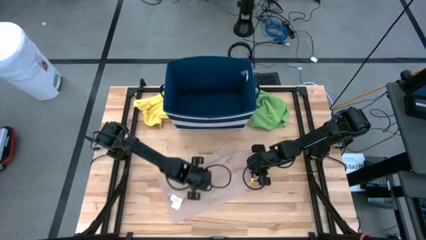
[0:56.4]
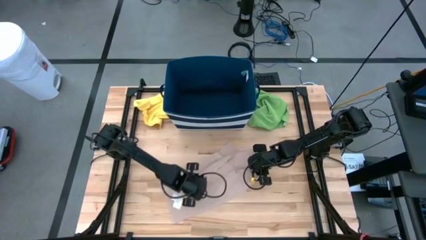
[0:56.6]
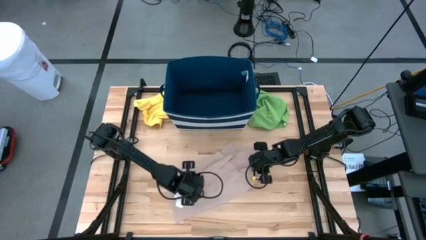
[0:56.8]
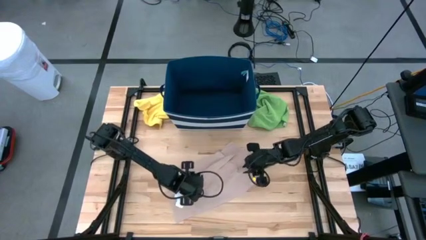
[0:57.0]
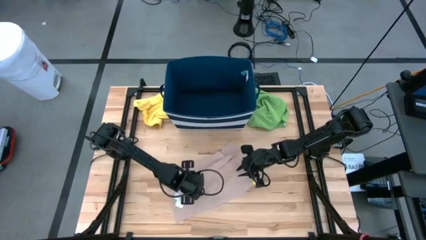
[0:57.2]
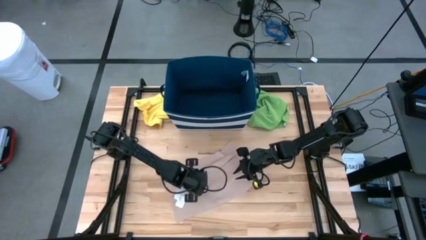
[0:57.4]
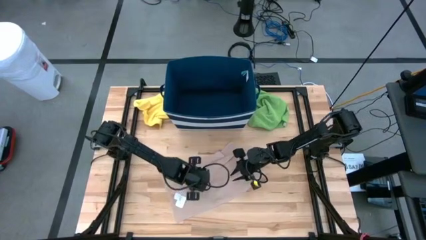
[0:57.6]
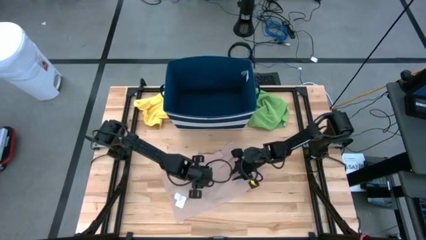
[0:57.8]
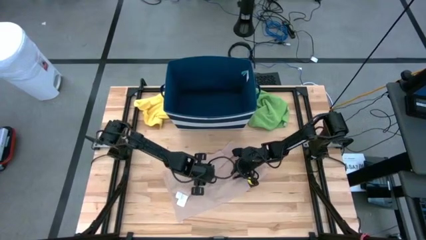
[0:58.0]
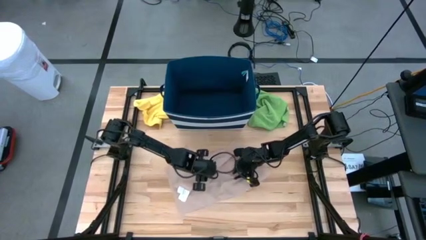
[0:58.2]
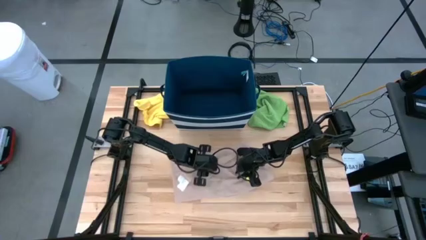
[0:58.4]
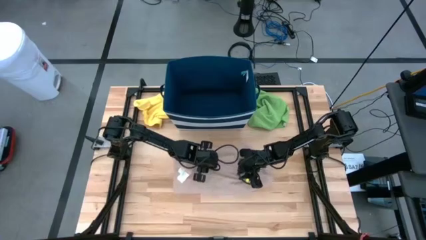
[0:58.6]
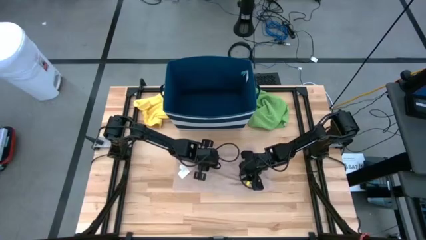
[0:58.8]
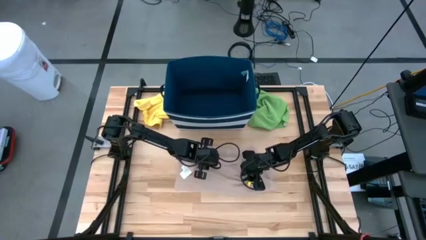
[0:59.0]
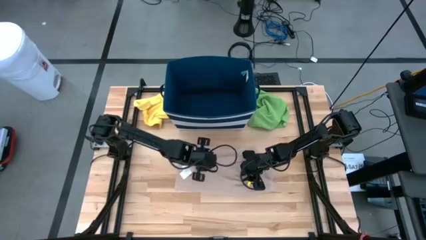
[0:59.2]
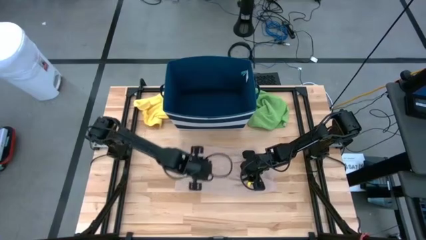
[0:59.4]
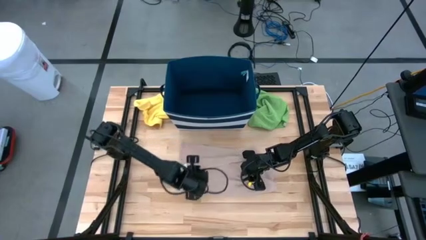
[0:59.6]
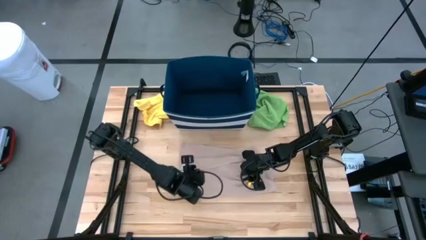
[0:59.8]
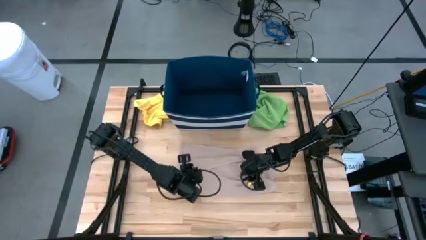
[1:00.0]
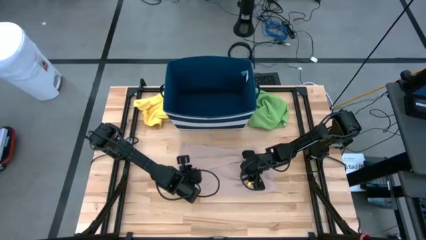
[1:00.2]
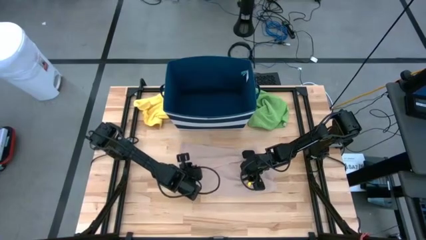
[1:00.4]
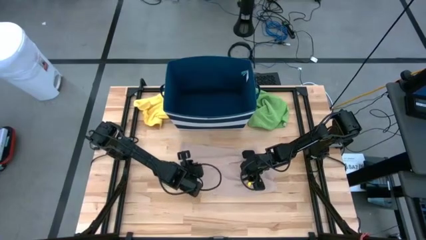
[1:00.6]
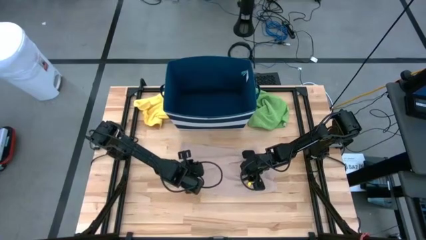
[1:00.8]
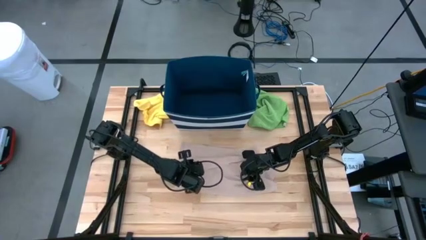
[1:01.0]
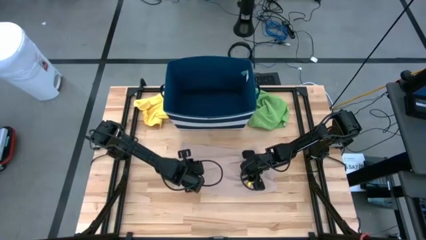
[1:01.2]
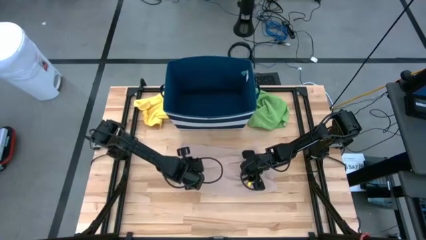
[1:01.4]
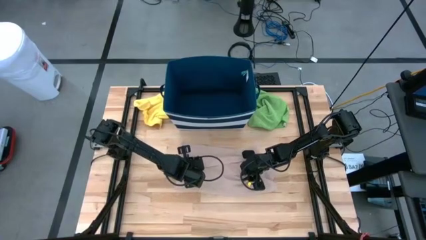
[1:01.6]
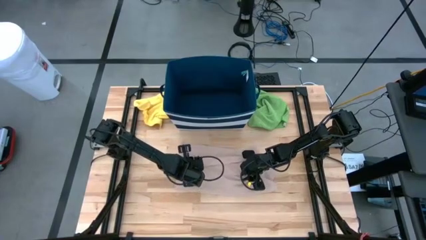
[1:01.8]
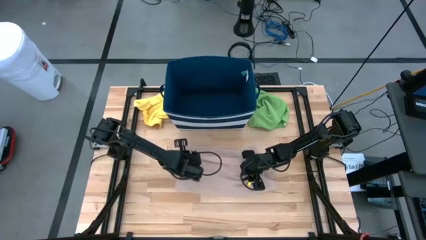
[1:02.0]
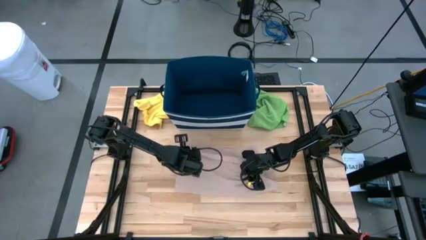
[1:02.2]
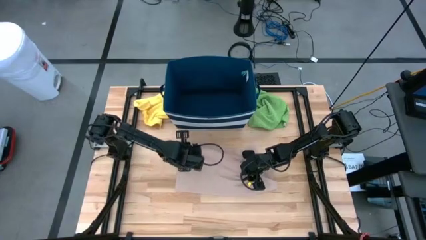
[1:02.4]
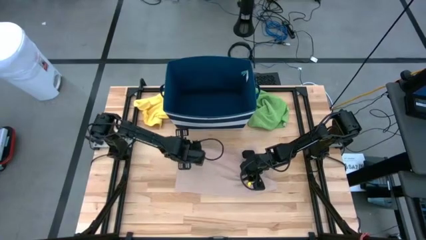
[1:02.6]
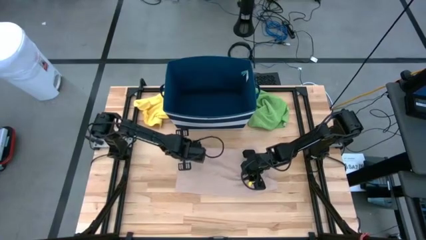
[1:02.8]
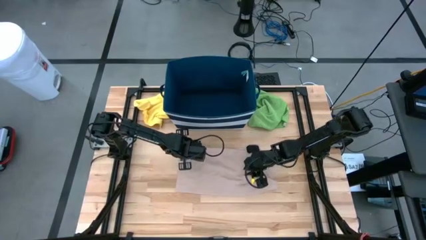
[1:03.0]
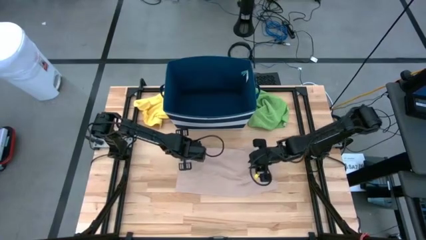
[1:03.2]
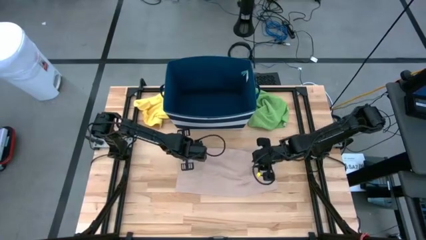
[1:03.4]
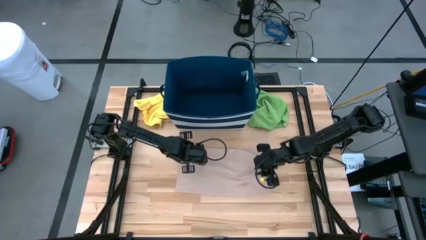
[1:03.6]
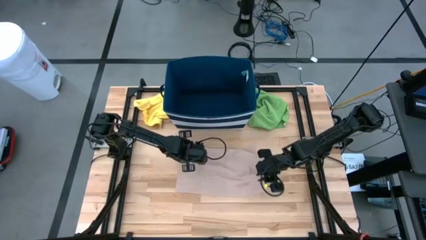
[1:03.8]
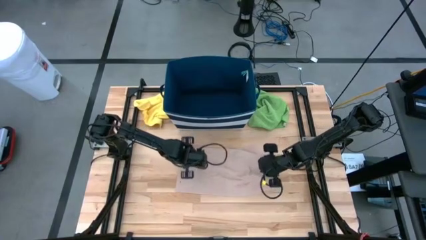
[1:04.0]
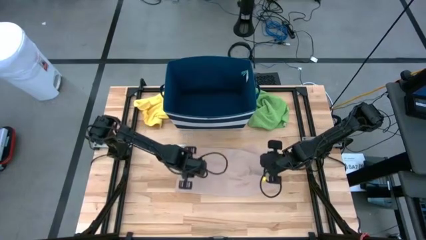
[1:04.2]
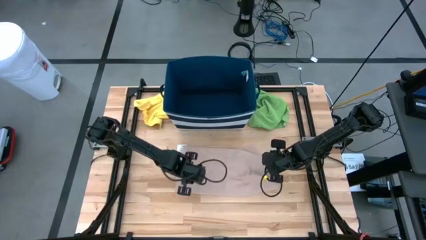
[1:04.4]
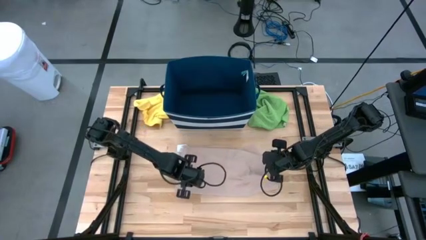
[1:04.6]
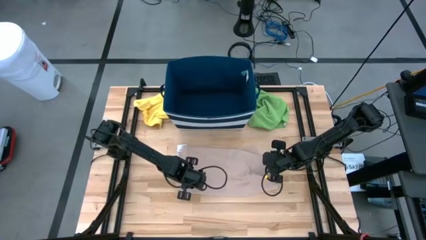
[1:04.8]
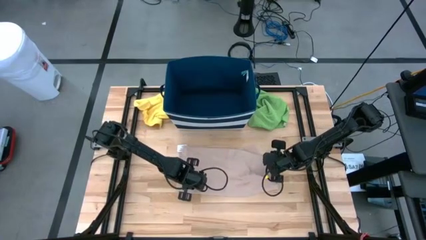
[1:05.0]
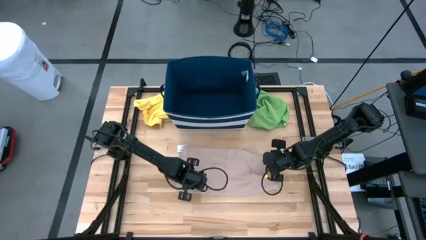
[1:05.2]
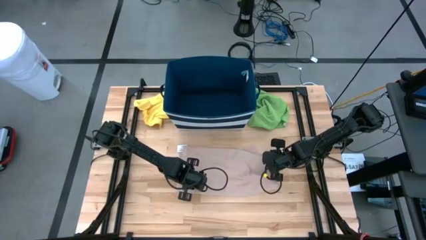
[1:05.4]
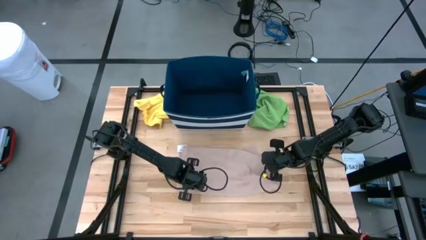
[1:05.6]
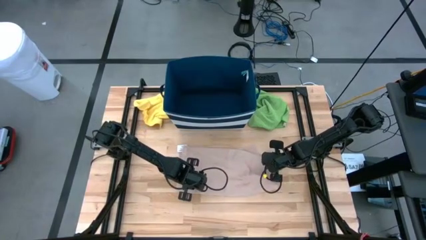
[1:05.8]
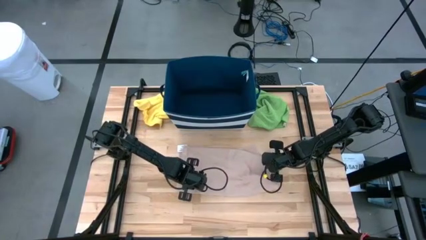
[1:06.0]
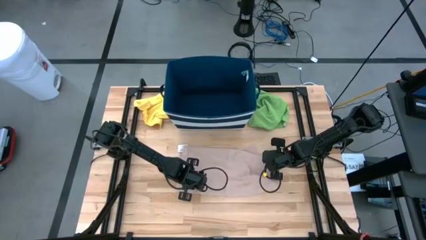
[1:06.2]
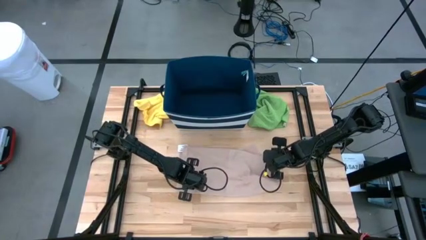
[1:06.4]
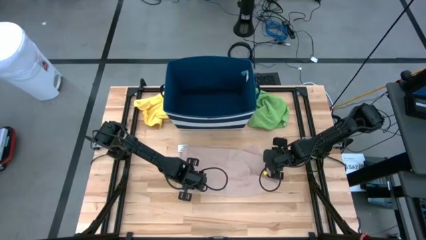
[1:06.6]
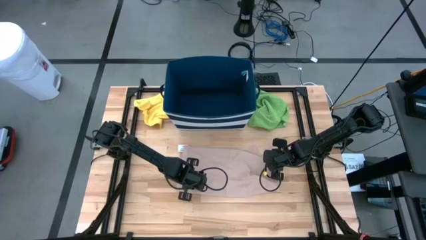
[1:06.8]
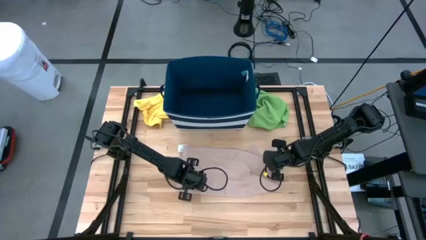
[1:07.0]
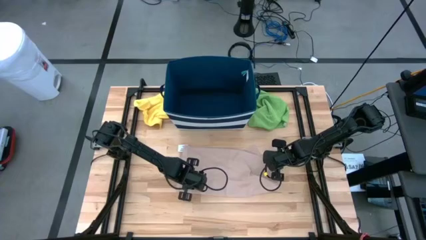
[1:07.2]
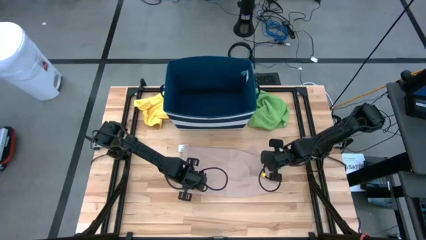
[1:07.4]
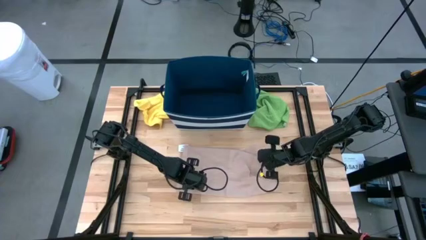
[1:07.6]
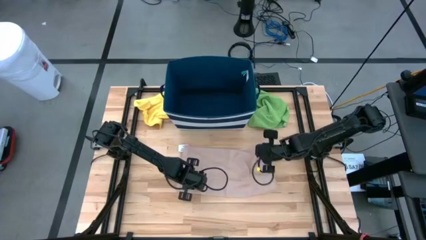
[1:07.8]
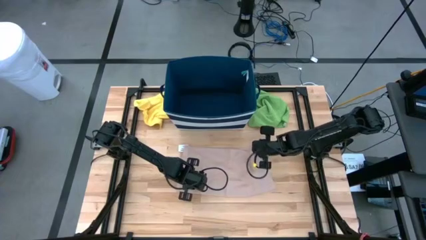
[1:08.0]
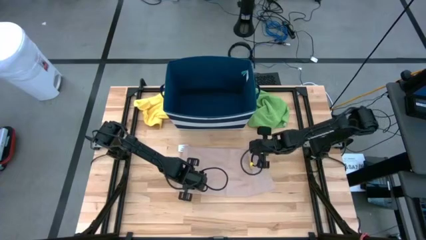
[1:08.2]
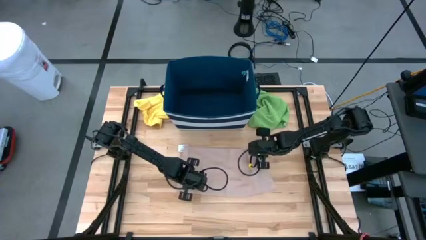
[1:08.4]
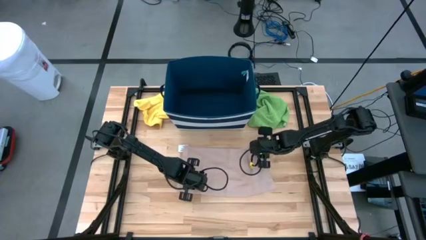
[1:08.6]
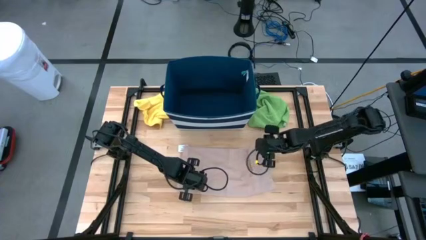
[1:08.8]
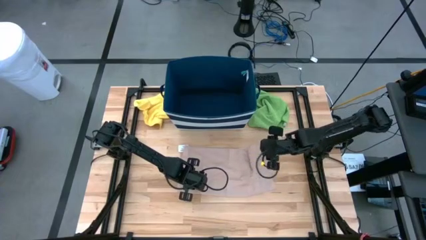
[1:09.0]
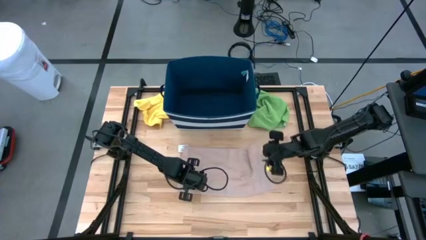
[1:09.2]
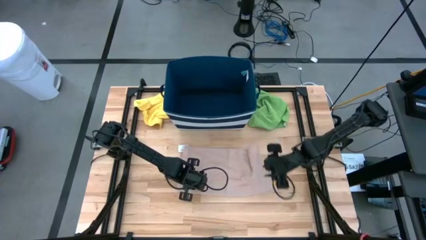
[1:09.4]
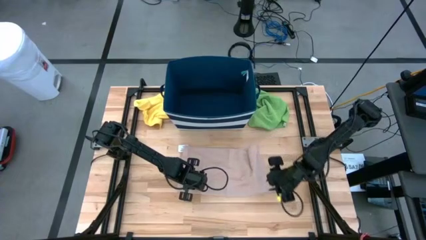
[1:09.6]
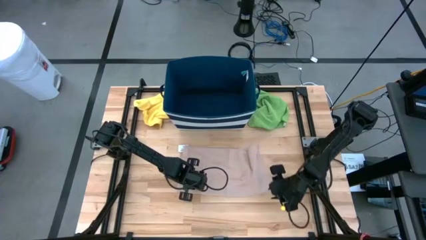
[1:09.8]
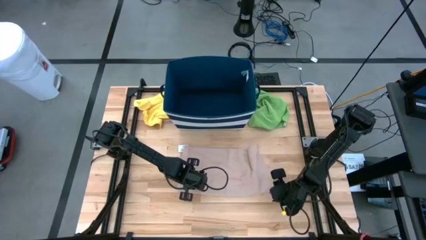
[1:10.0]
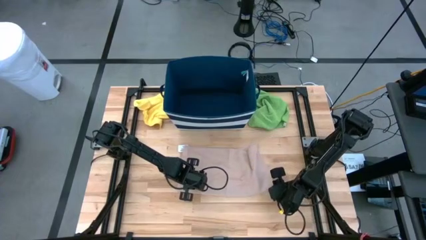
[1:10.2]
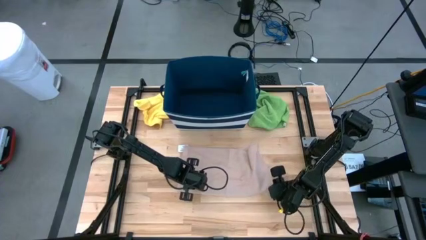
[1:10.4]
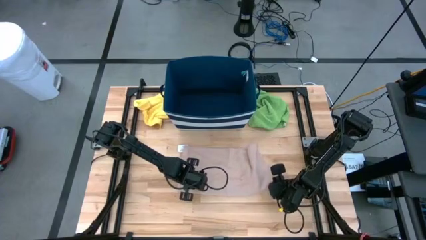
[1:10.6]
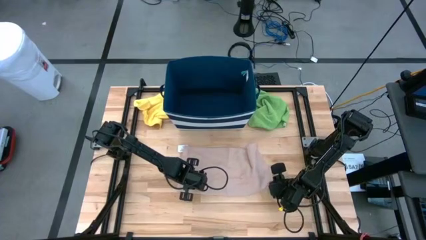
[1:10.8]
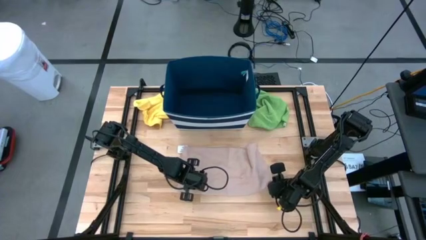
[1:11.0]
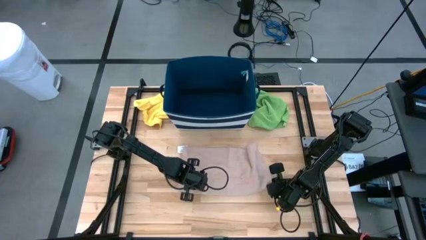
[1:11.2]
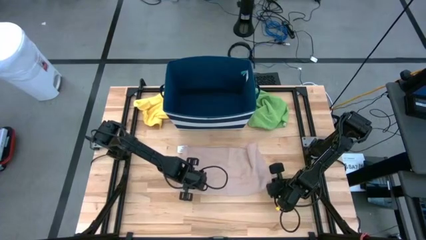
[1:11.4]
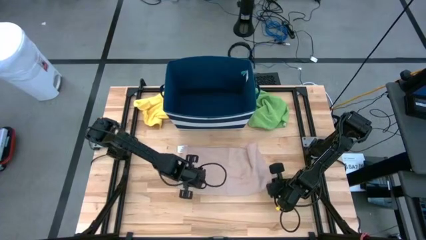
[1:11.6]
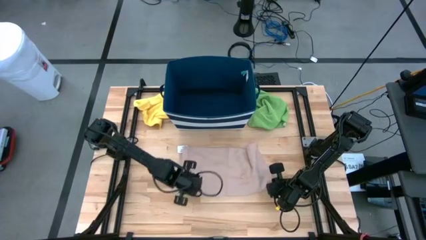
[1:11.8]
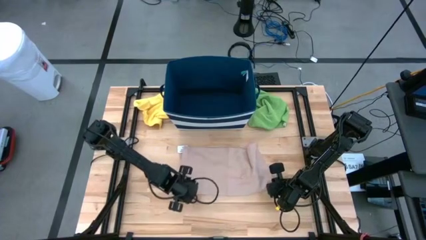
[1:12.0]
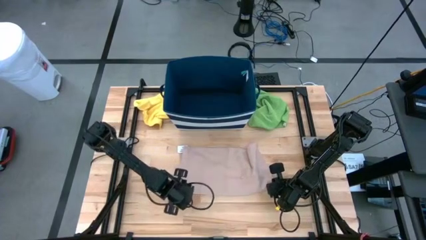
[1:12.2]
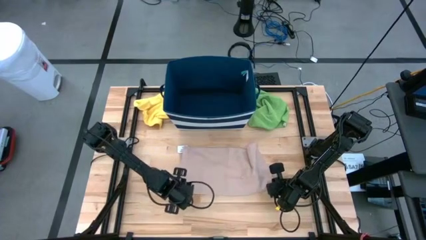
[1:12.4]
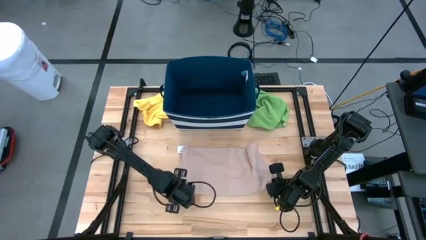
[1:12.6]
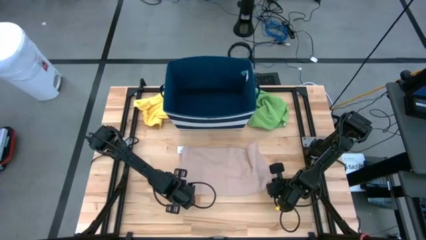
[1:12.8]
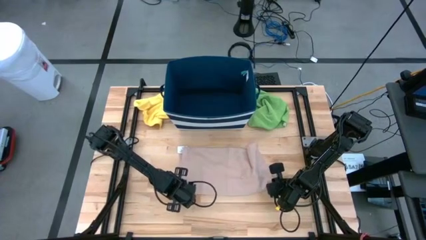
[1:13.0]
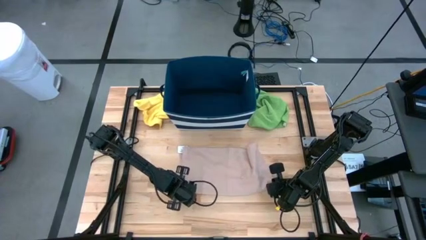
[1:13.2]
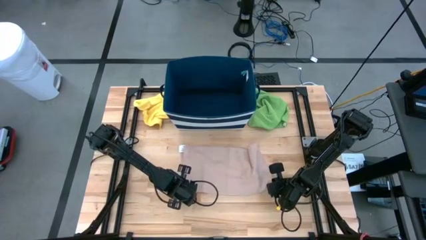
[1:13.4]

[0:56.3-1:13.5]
Task: Fold towel
Fold the brown towel
